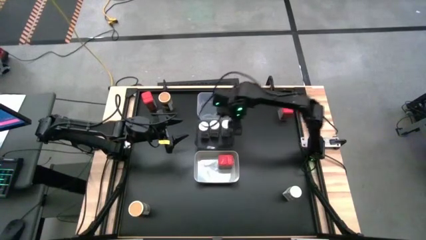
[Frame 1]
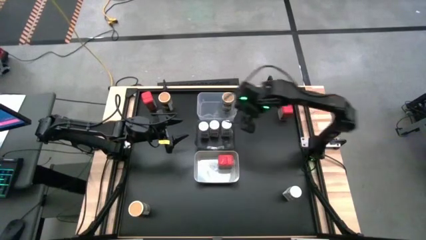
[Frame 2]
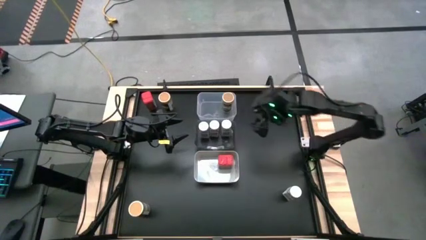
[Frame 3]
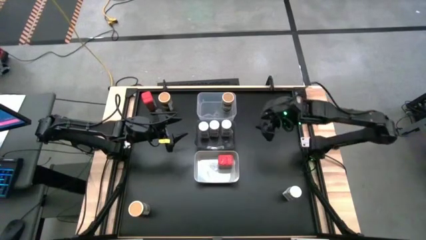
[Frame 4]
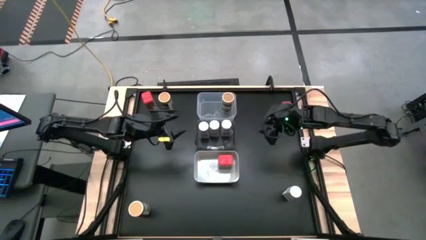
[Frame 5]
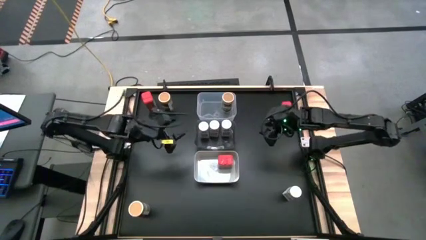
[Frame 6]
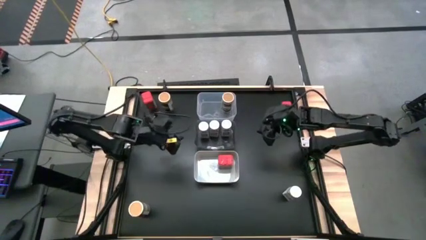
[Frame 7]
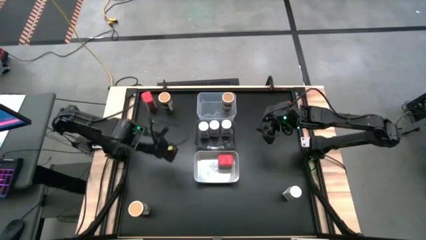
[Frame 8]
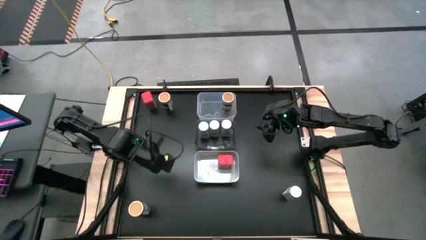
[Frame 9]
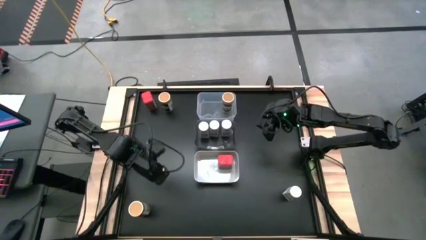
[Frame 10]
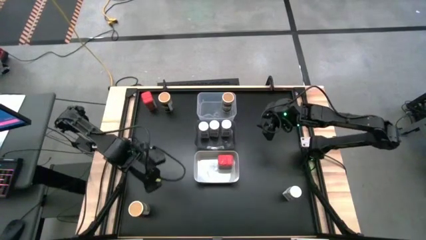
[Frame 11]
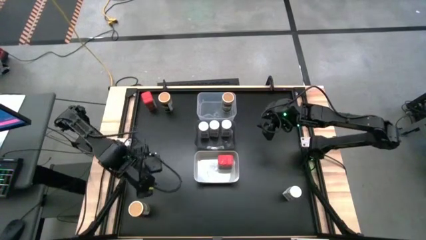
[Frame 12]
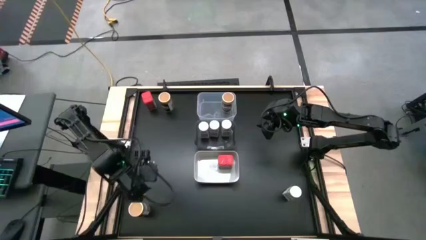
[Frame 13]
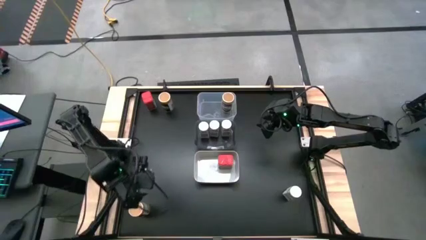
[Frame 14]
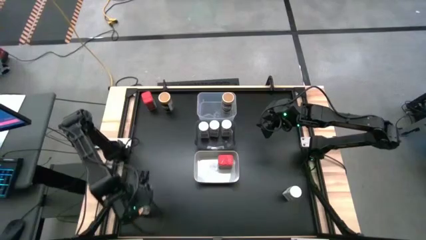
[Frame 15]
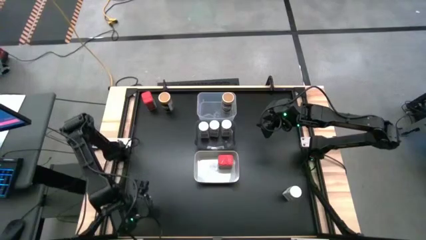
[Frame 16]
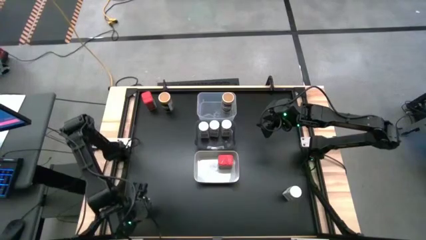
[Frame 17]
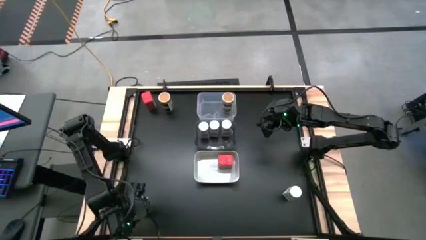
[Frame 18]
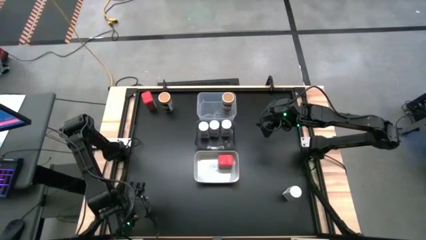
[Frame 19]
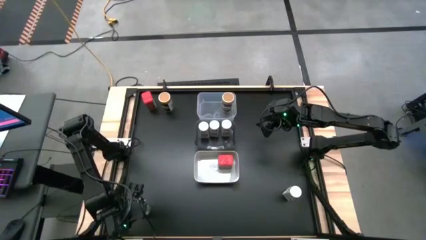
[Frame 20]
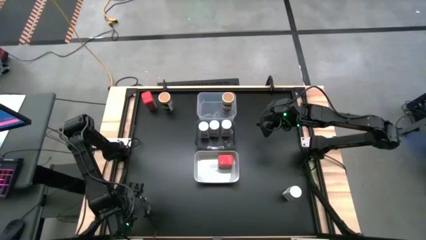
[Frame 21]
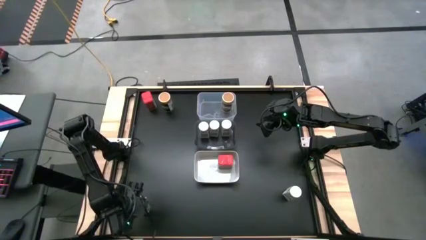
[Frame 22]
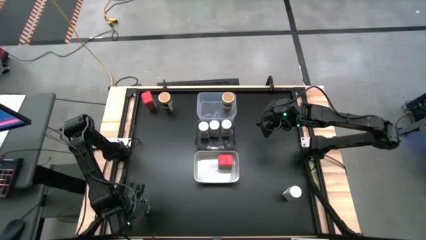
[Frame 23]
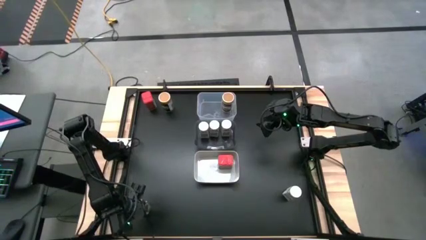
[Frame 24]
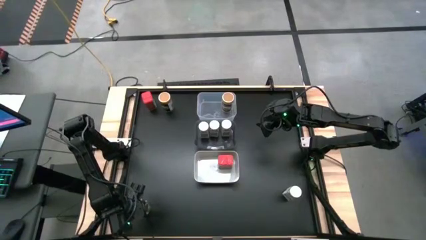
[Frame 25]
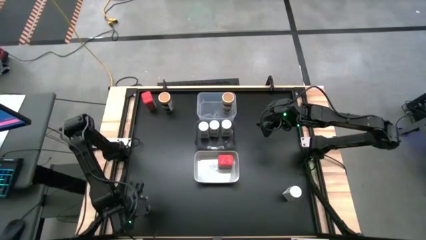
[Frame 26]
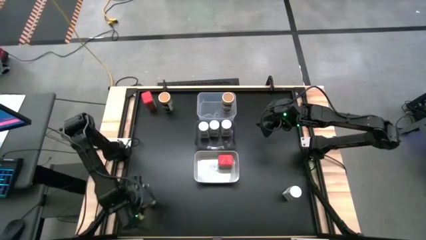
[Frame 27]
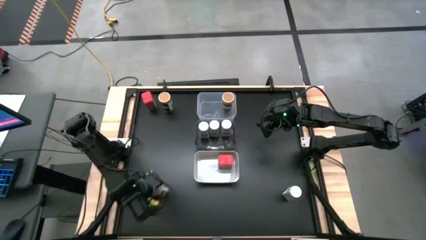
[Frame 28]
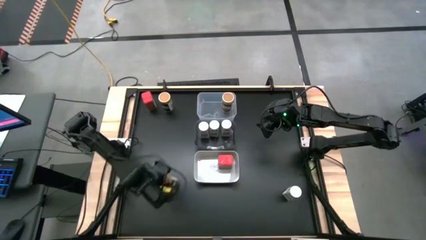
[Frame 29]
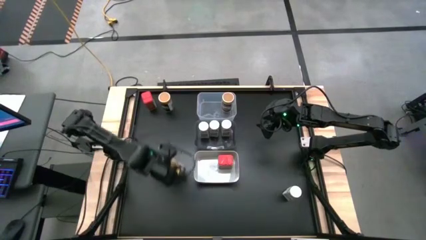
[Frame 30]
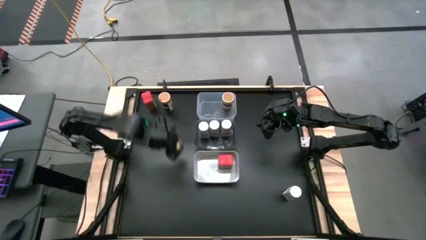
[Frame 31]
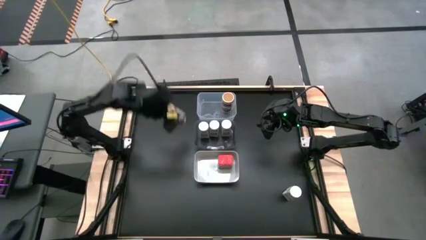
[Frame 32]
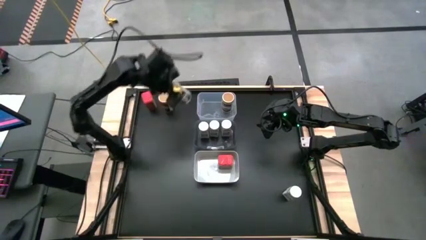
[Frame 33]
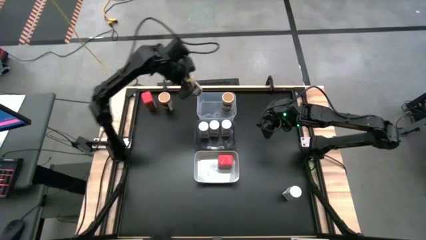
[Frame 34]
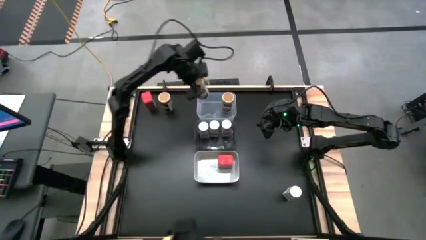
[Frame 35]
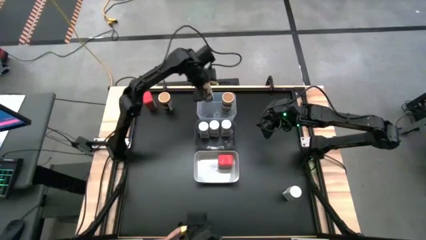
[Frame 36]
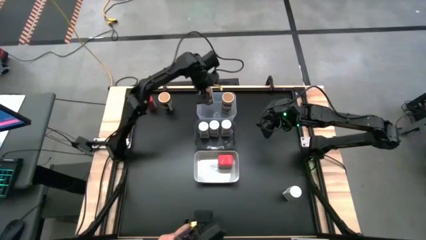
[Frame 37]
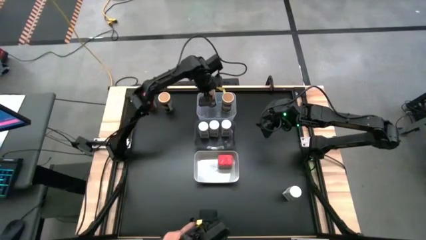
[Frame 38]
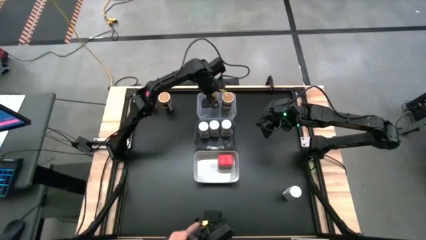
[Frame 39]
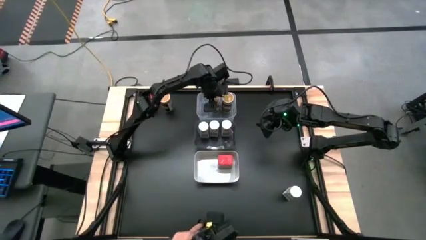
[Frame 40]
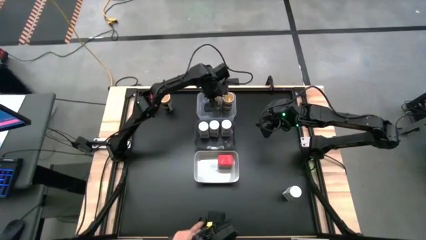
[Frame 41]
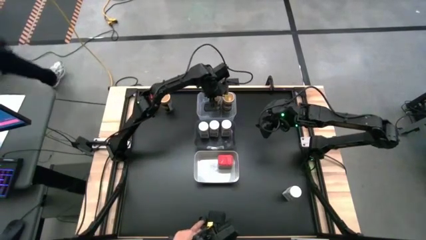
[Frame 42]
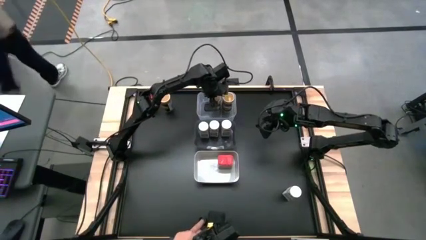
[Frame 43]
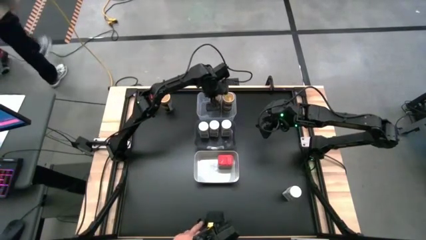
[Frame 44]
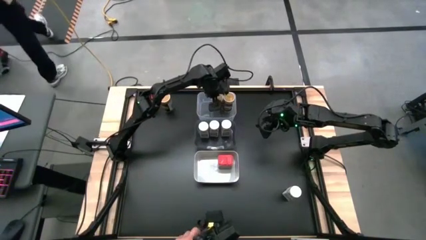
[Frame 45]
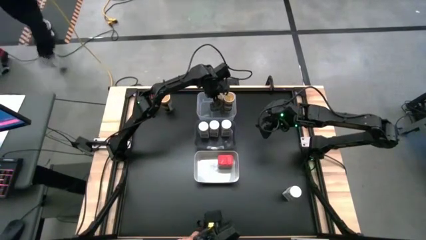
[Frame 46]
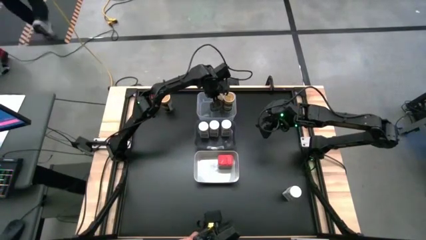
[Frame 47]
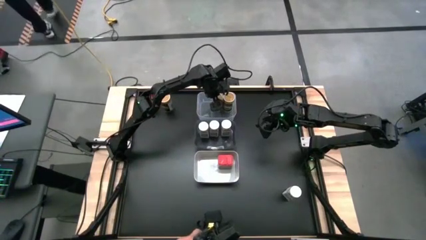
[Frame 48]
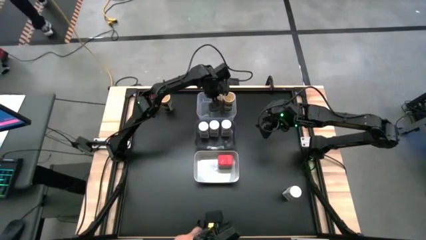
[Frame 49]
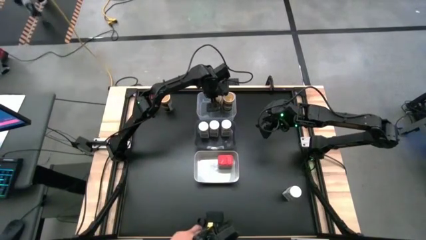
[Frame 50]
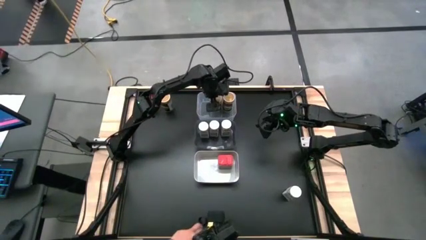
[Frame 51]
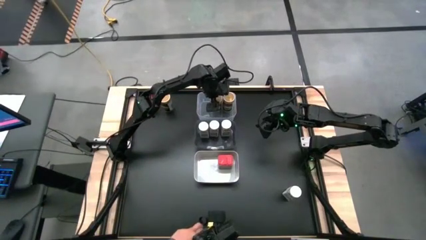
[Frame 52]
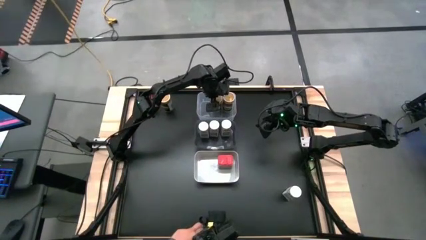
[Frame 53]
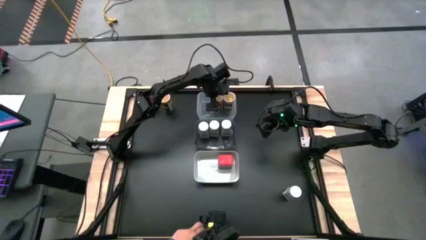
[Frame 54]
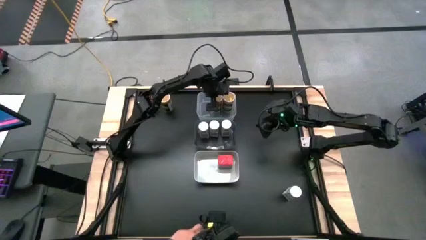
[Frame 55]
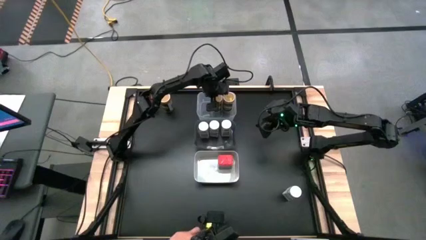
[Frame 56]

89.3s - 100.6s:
Task: Sort spices by type
Put the bottom brown seasoning bottle into the white transparent bin aligned with the other brown seasoning bottle
